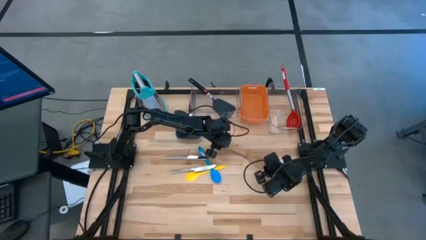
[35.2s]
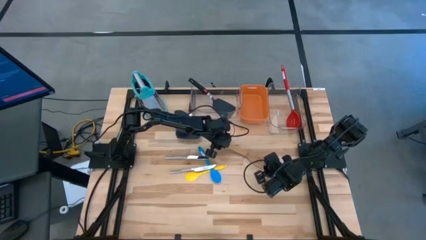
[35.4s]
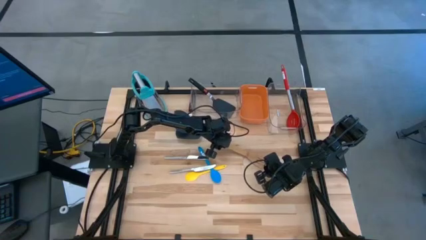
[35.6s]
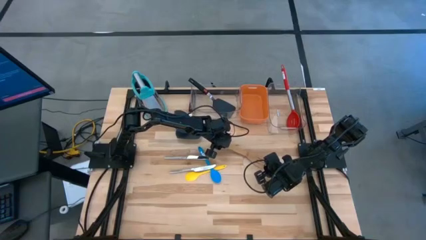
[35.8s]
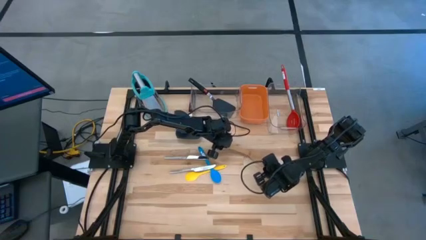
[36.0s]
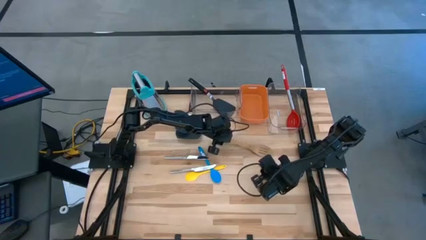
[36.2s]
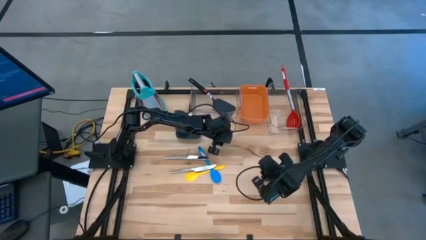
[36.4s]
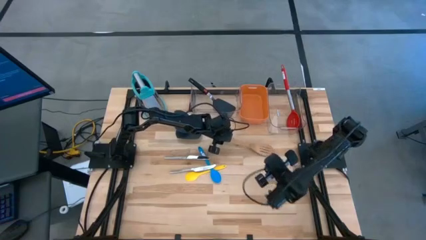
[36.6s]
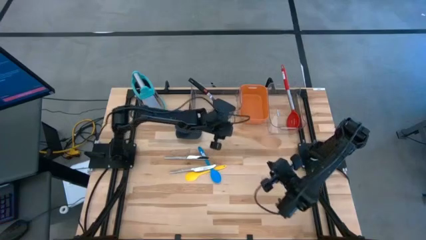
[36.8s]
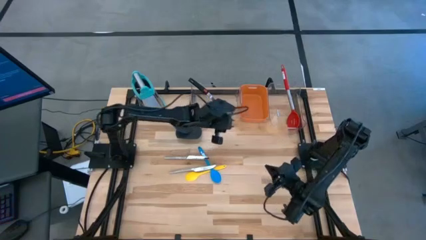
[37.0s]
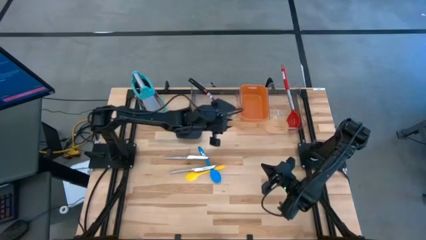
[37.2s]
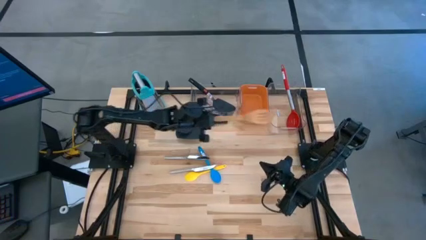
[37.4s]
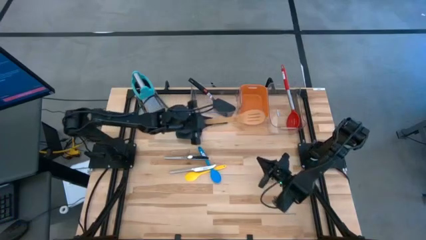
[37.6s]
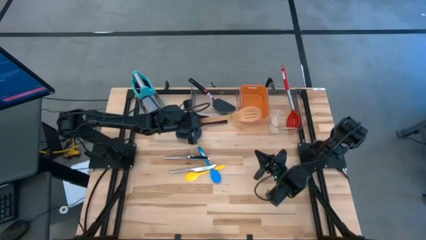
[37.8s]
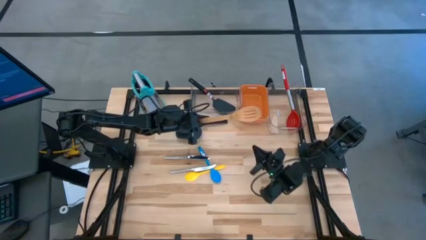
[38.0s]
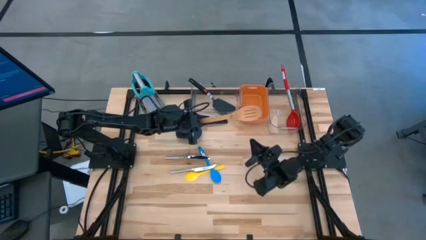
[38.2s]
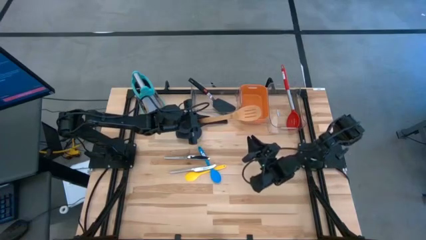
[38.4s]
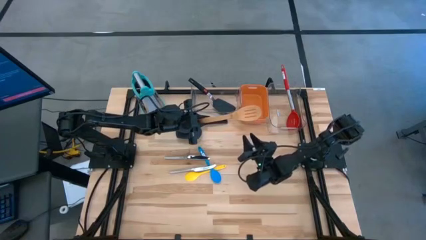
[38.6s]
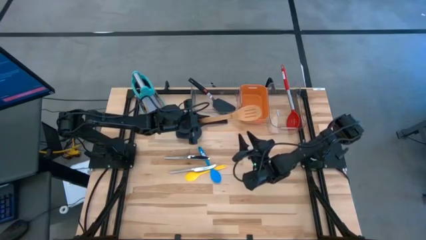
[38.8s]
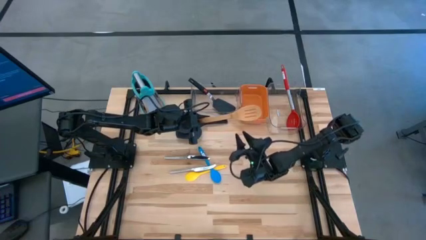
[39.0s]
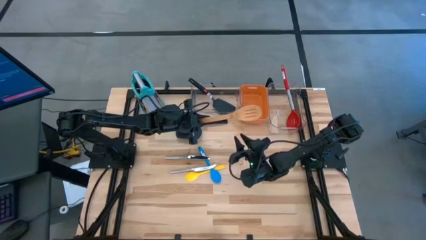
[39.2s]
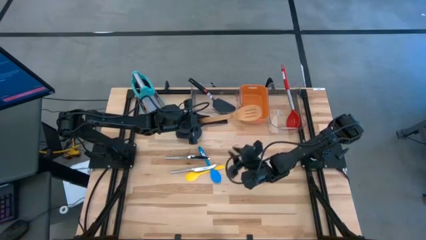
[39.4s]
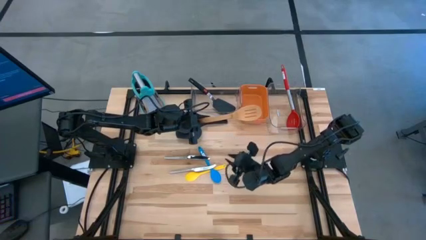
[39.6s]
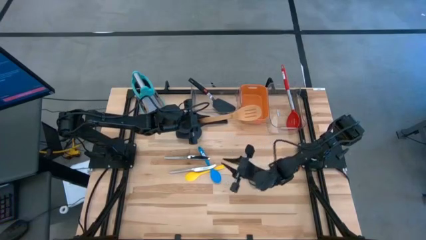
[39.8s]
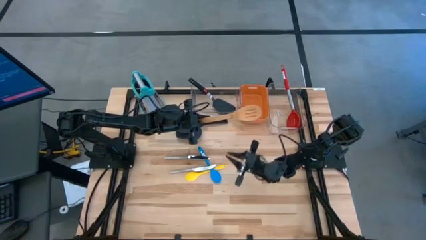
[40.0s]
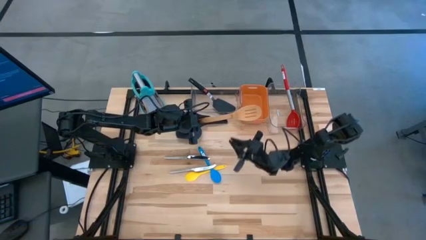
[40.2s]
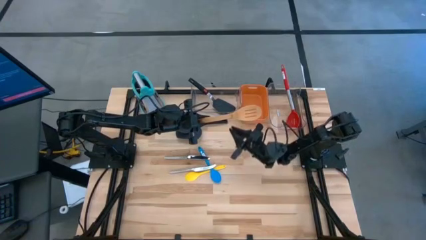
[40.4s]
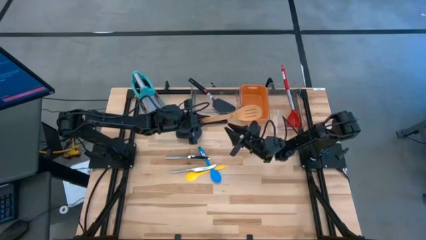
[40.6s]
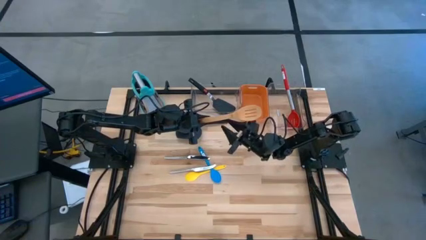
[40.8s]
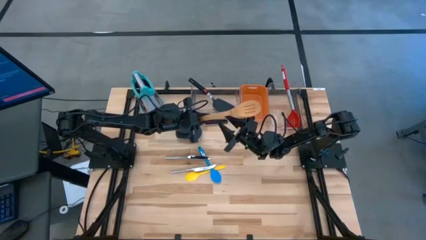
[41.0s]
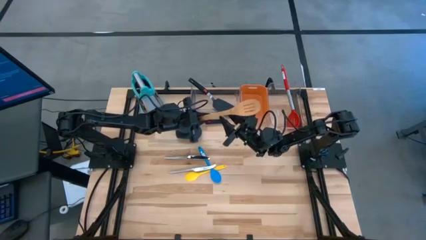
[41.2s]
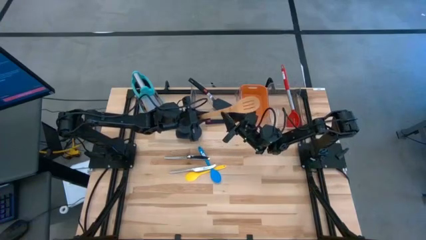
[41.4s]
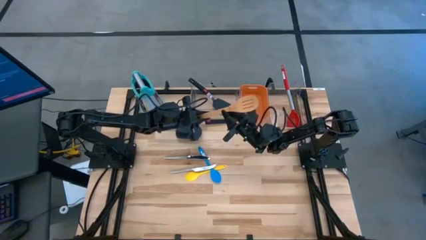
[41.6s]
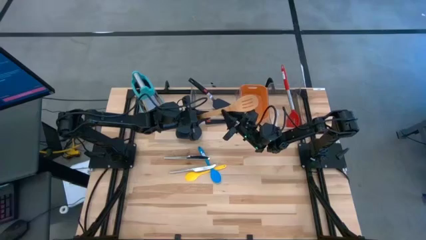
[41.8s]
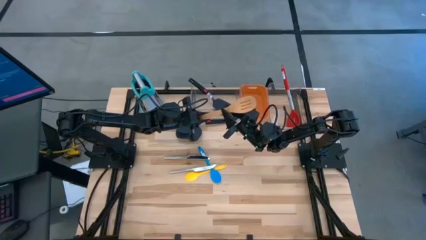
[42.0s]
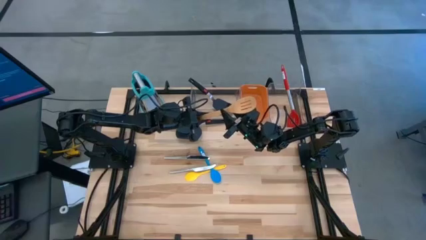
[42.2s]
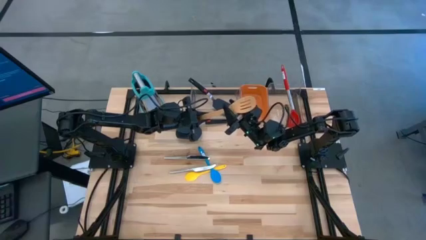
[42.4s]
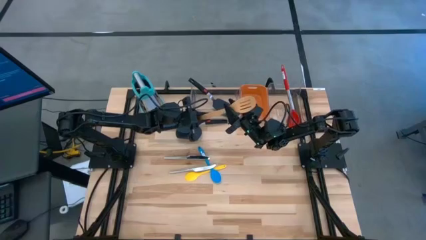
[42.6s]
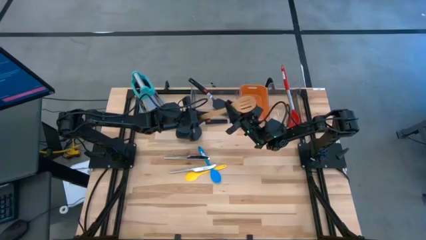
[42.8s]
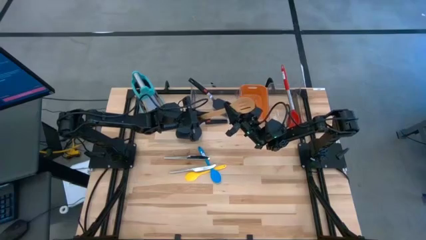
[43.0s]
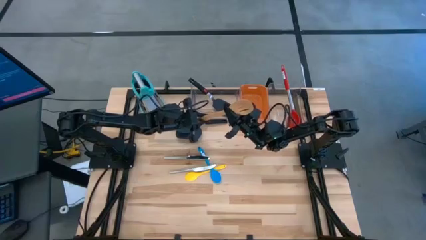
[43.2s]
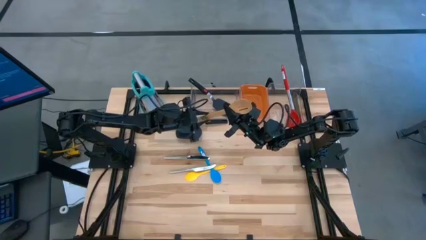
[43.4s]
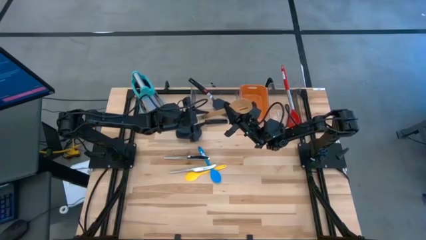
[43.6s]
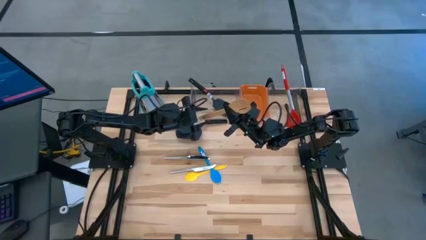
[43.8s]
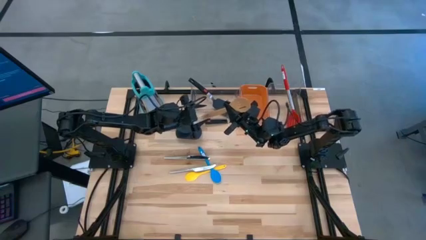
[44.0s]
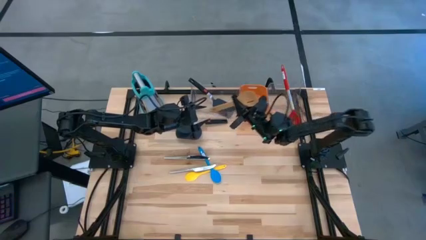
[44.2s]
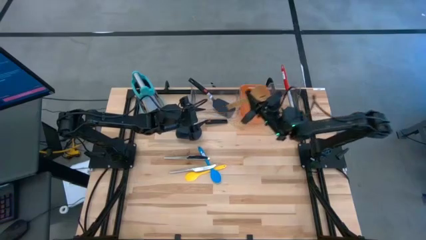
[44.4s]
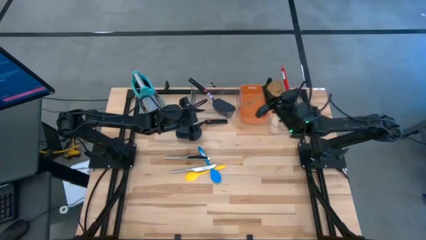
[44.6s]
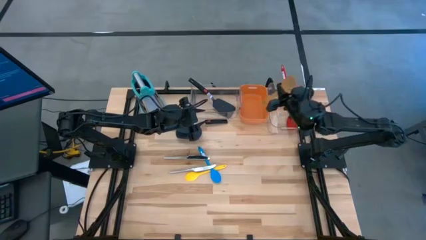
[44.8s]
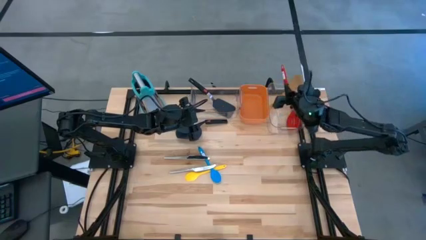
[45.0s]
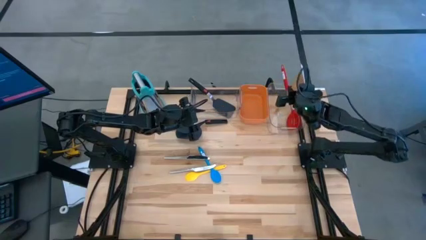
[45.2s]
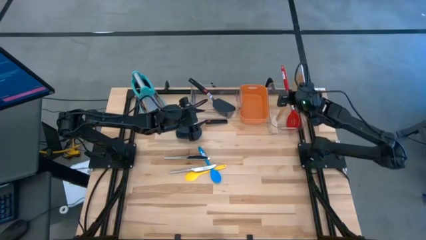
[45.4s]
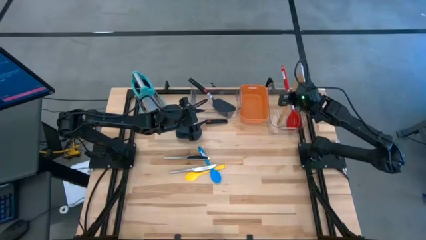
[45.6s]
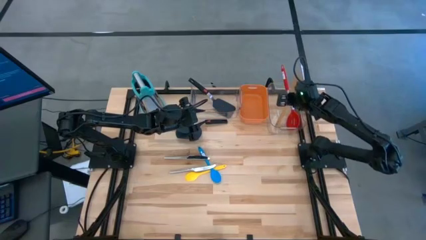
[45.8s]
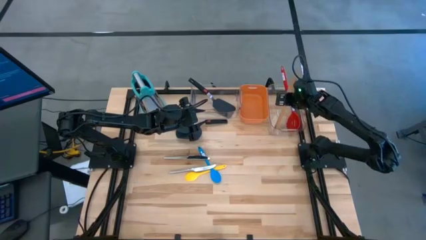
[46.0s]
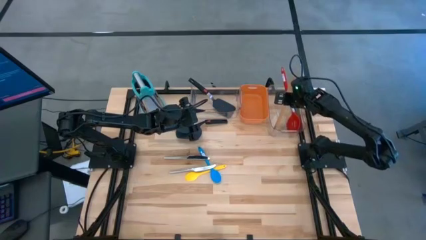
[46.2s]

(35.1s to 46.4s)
Task: Pick & Place Kitchen Items
Put the wooden spatula in the right transparent bin
